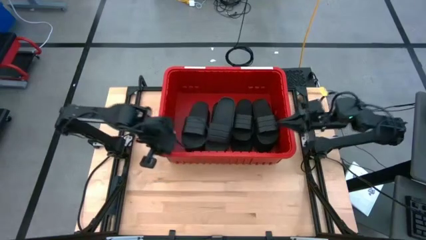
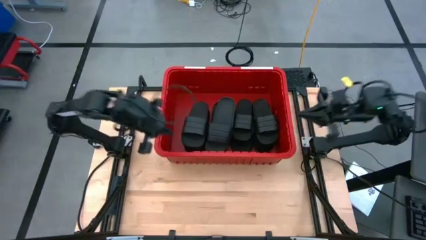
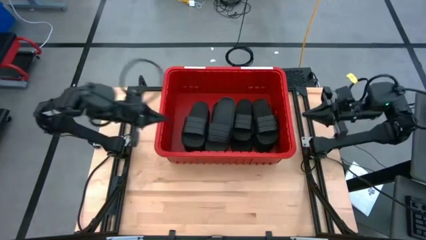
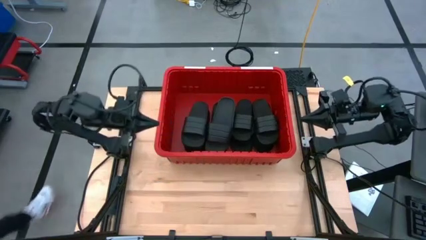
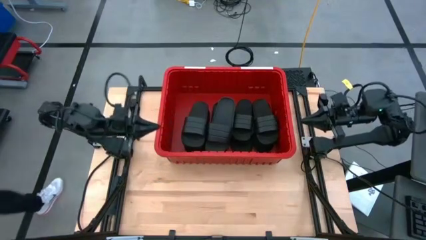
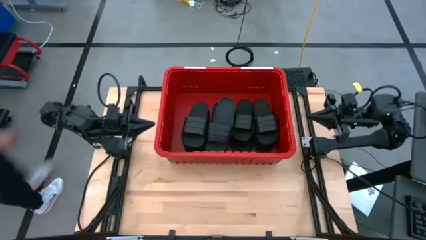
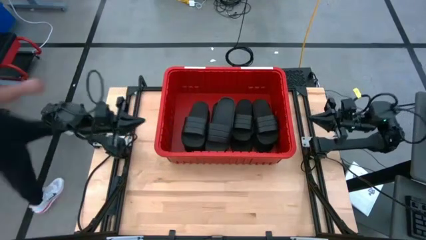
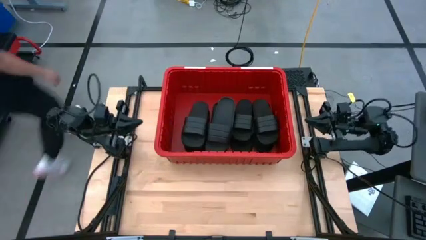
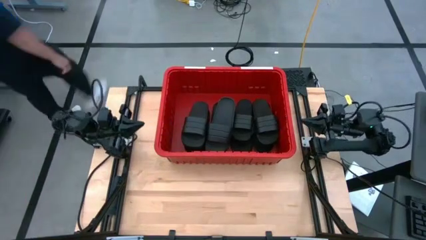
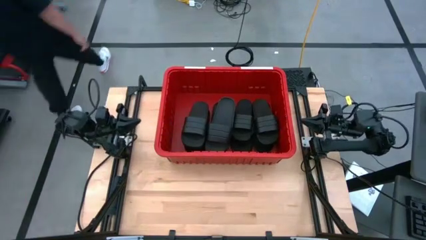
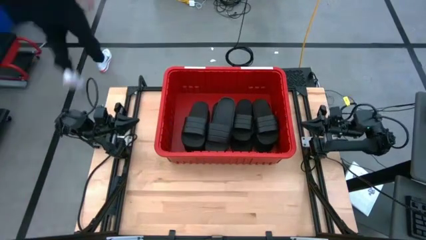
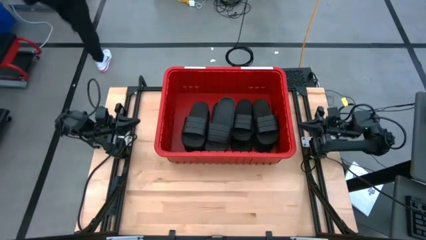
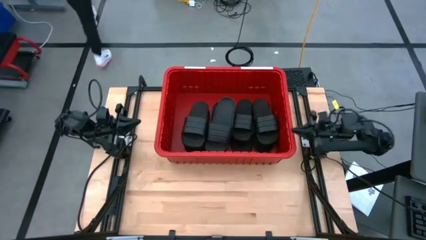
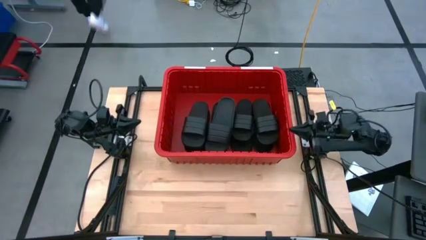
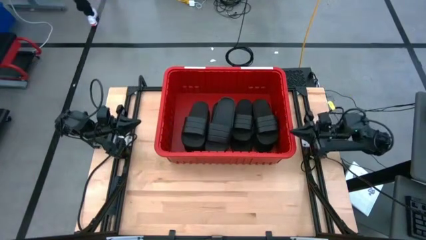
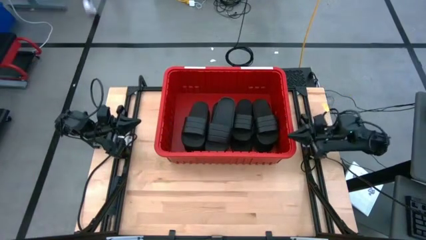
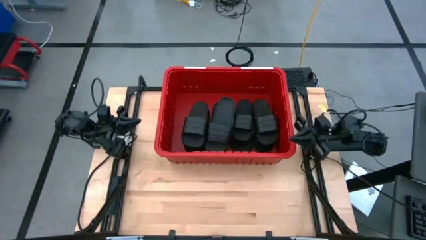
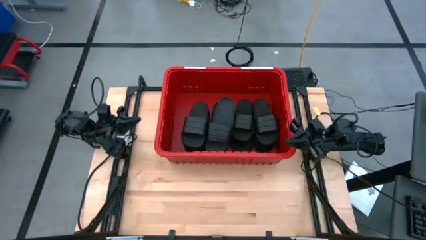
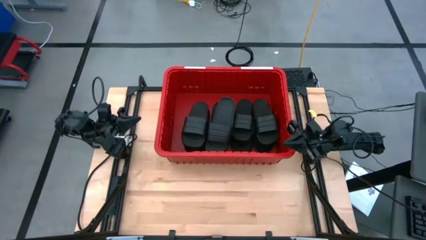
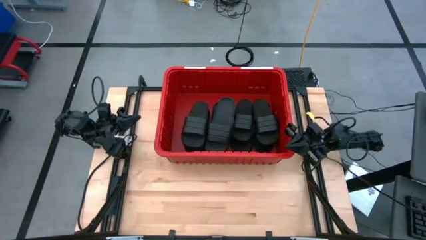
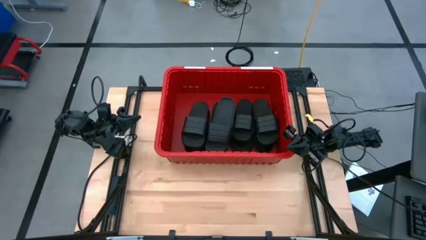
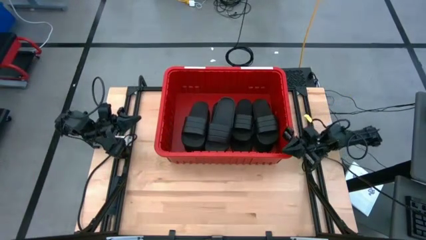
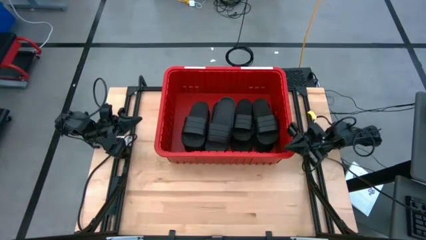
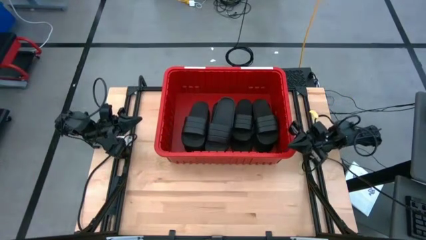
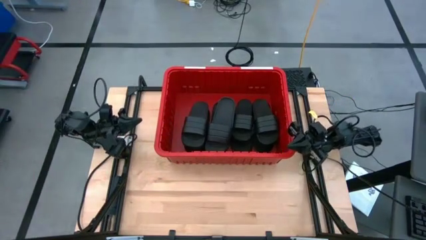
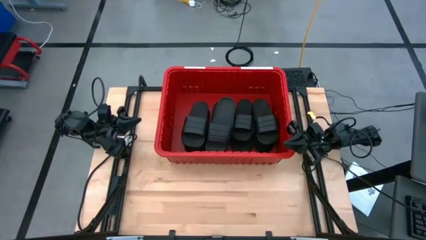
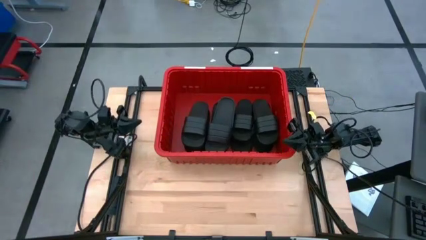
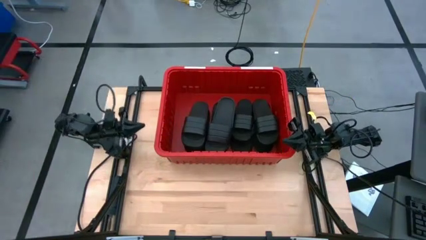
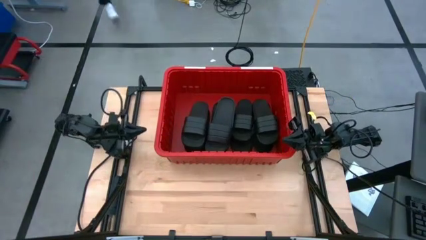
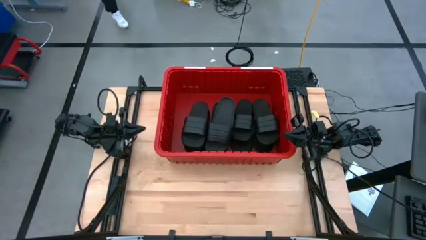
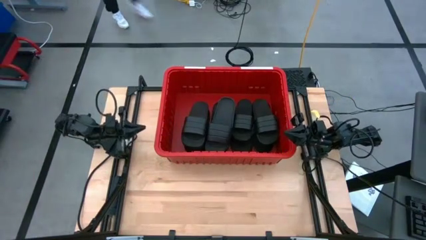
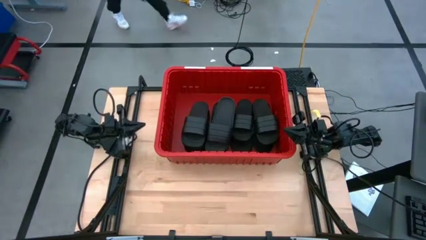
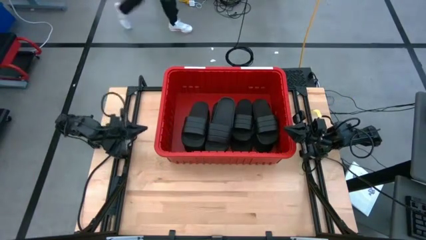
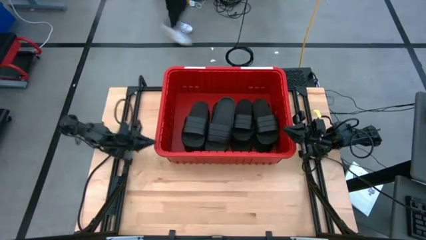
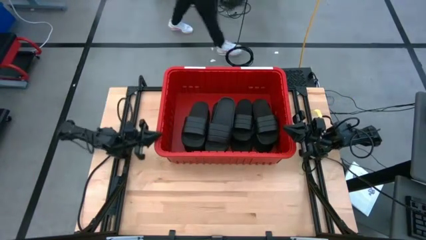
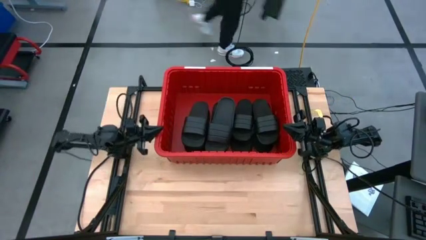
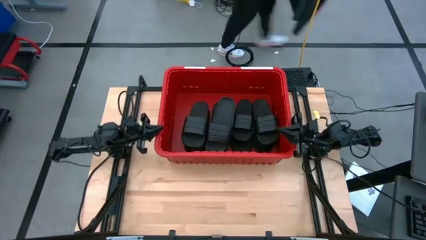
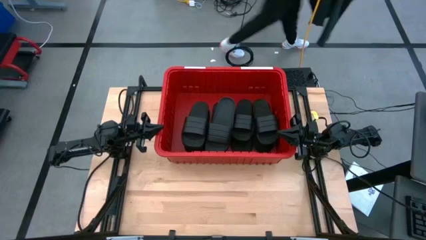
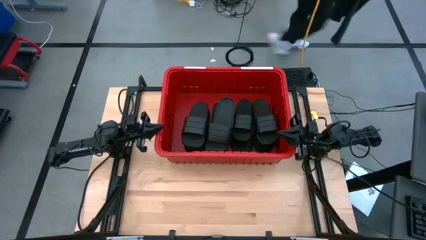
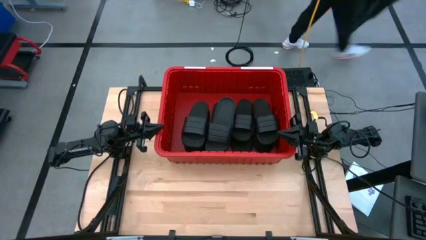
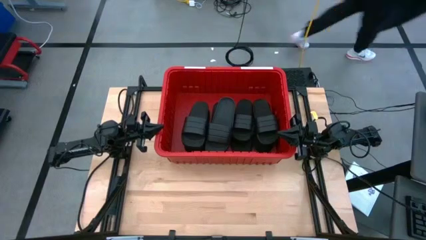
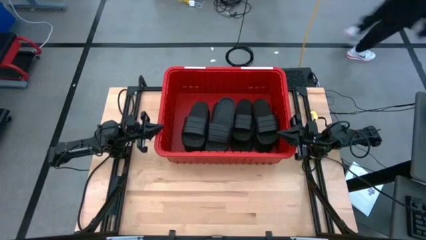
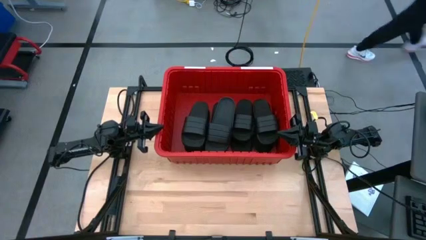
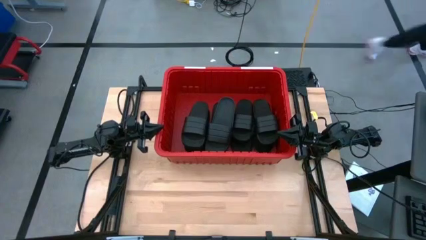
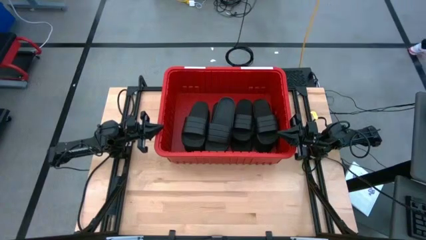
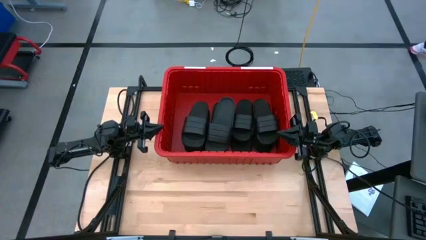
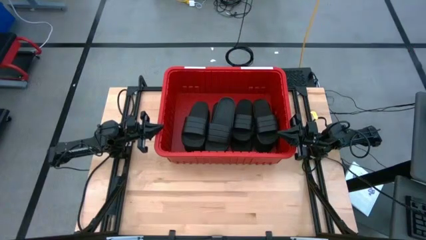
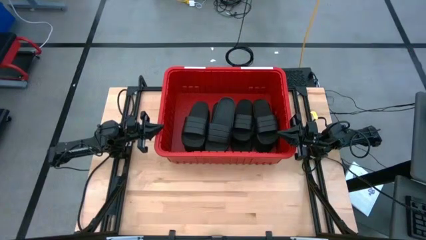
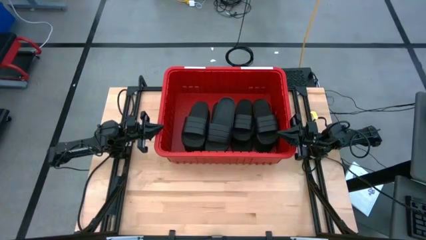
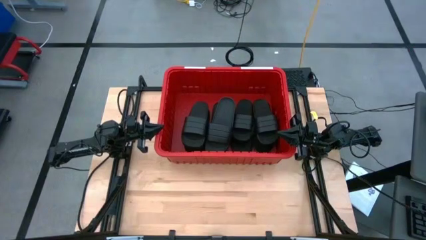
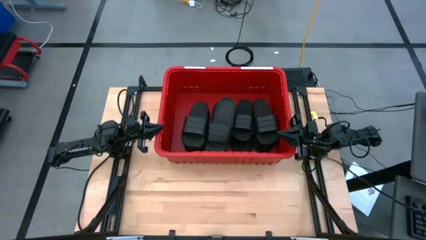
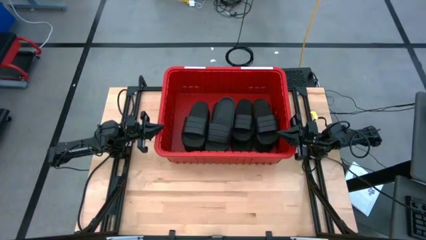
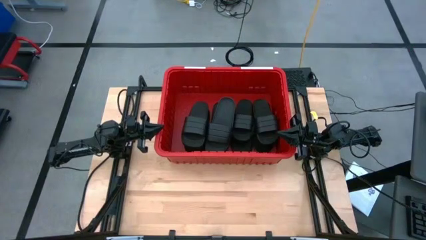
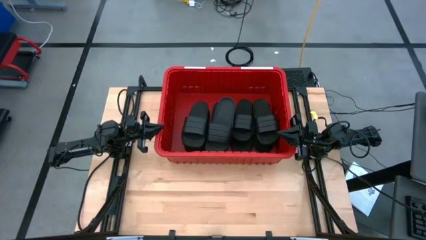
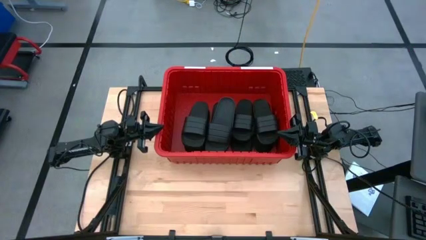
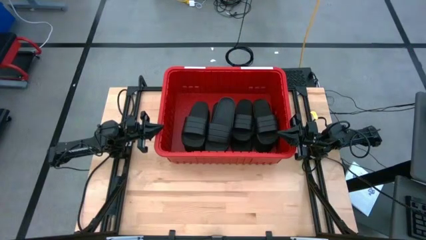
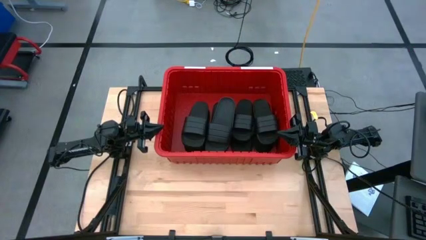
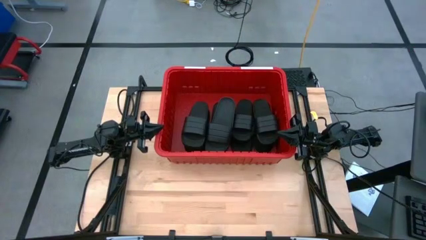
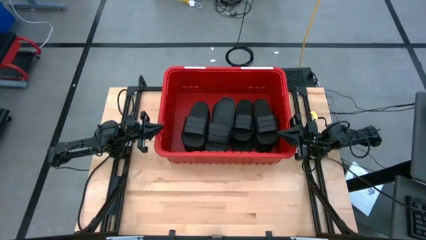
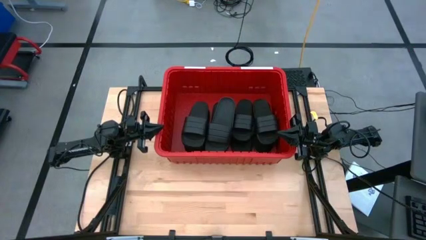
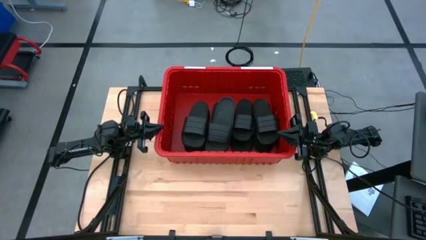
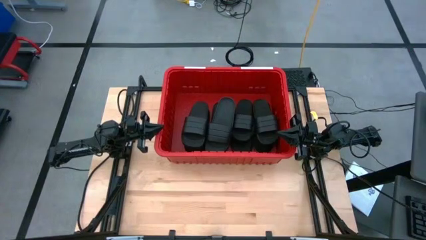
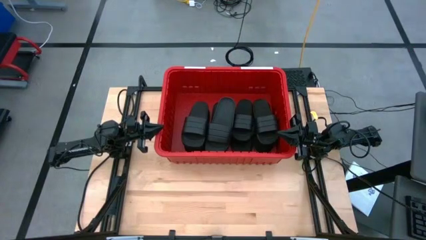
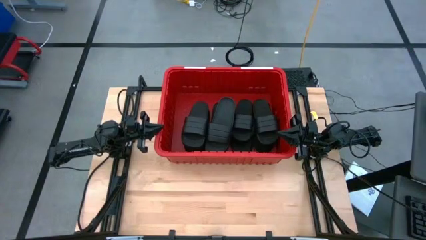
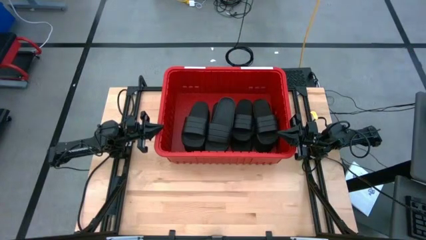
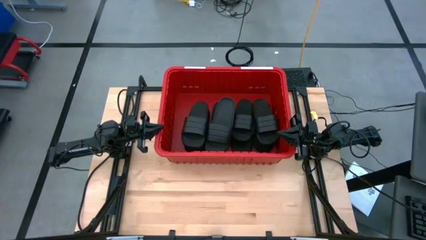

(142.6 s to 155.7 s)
Task: Pick and place slides into bin
Return to Home Position

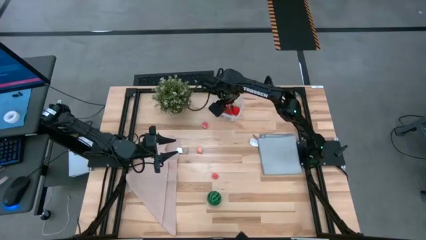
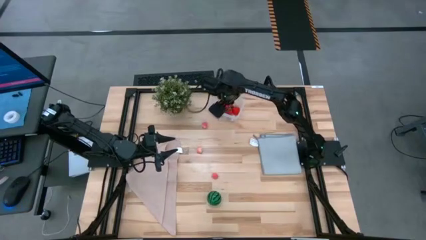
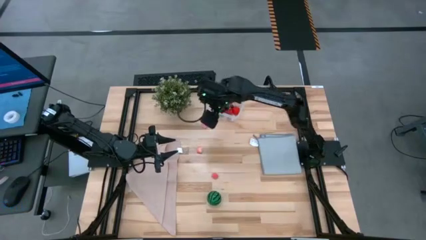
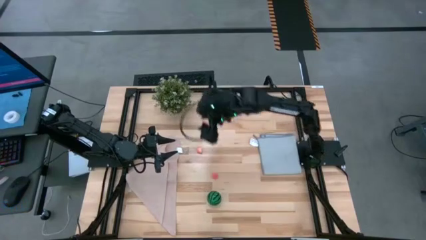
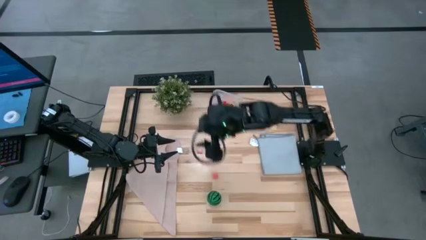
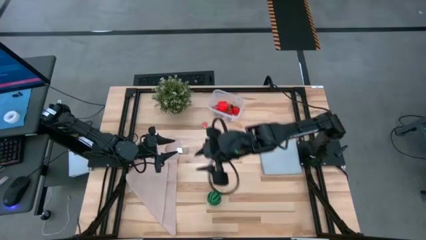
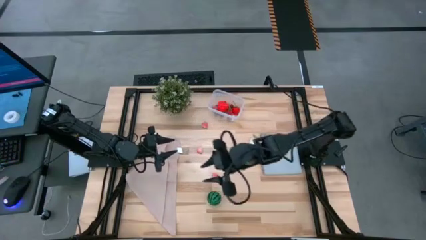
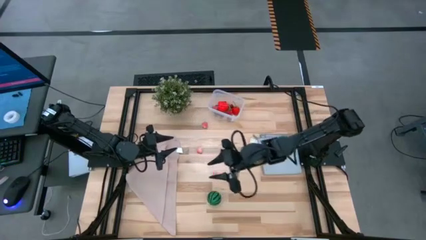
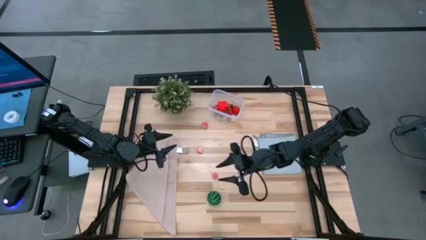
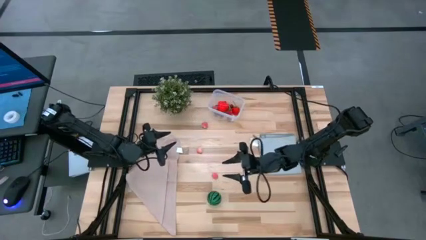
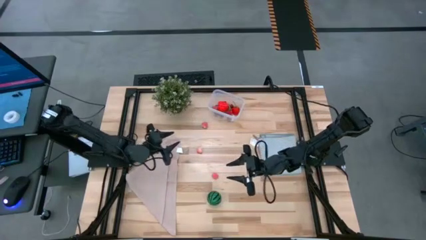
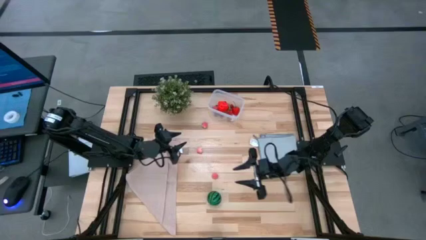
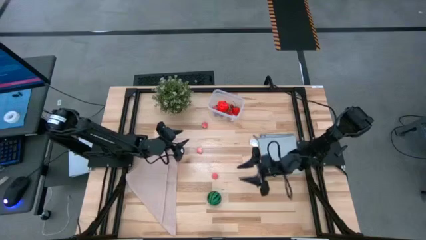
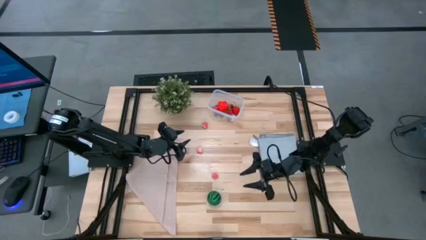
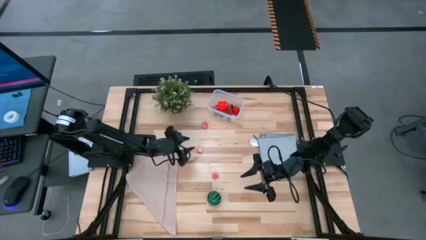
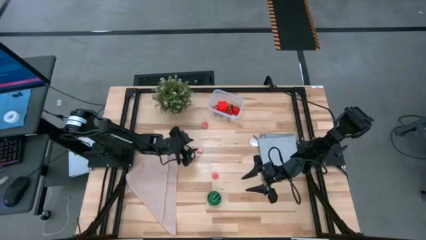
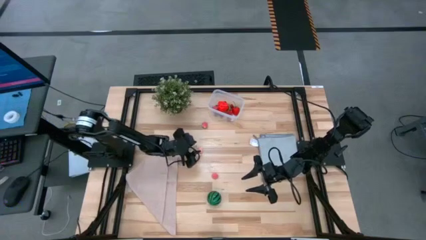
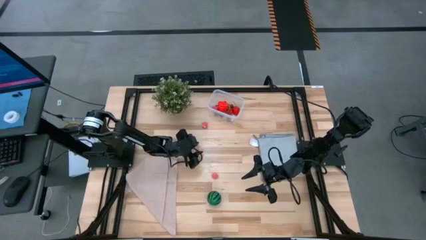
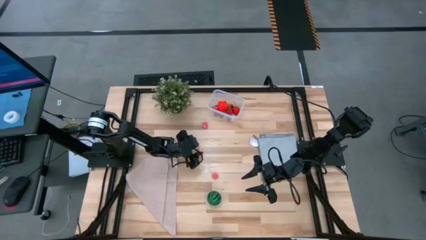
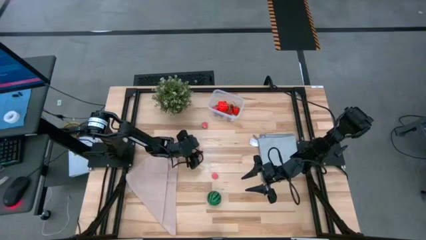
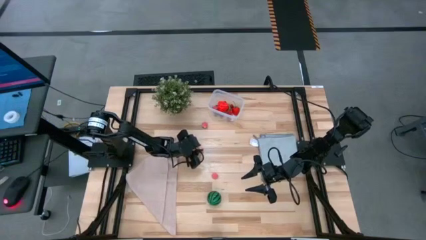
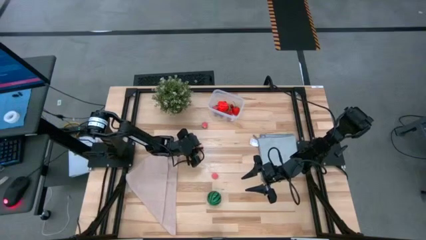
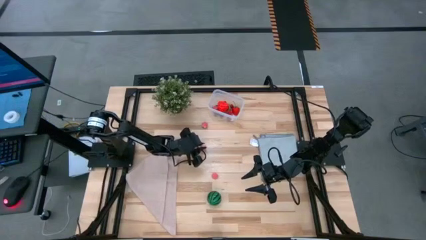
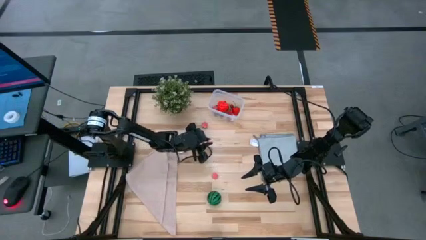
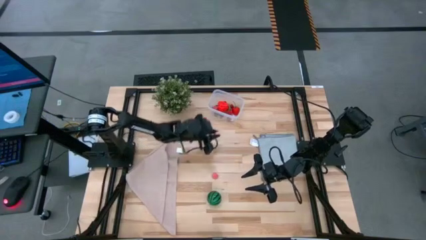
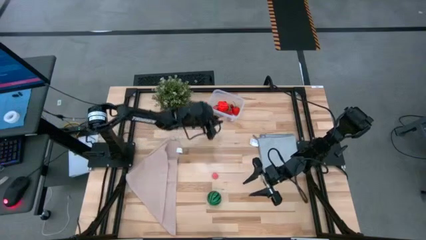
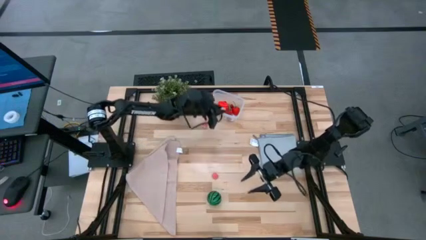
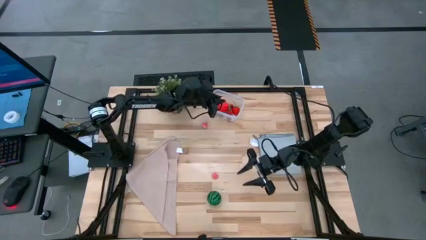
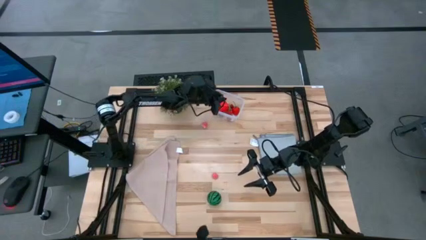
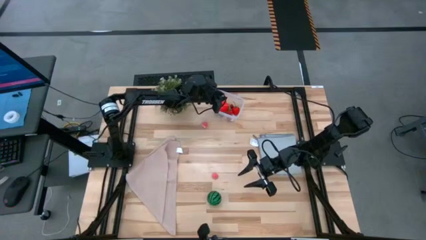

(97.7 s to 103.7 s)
Task: Pick and placing Produce into tupperware
Put the peach into the transparent bin
